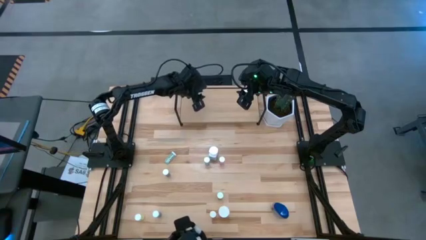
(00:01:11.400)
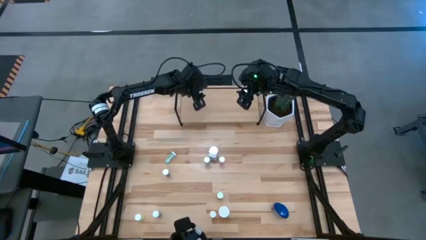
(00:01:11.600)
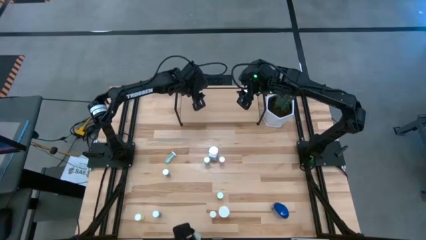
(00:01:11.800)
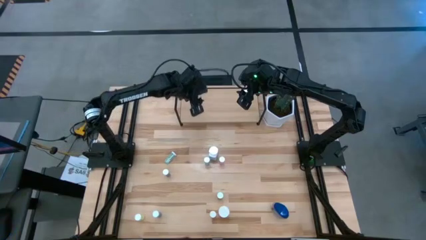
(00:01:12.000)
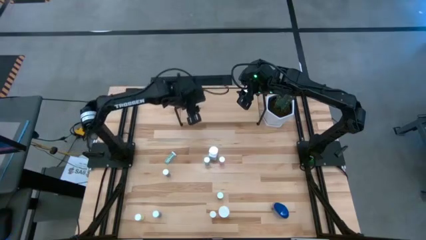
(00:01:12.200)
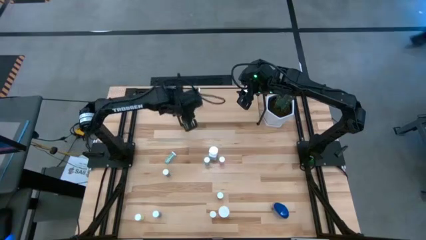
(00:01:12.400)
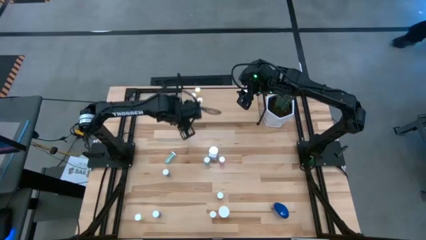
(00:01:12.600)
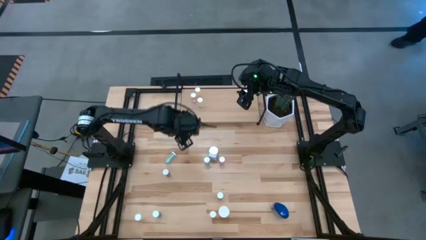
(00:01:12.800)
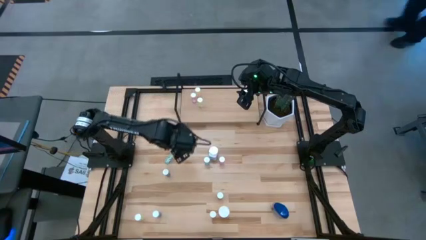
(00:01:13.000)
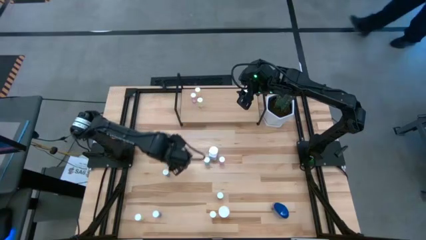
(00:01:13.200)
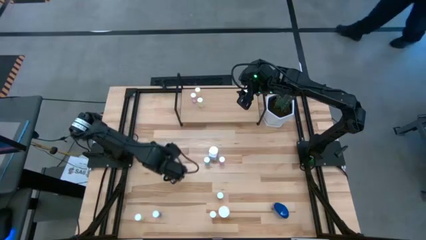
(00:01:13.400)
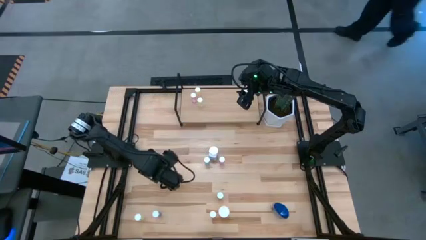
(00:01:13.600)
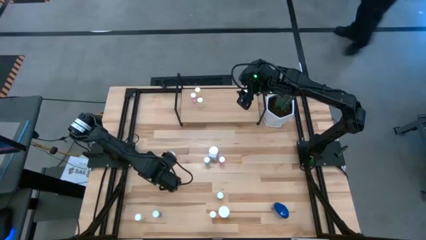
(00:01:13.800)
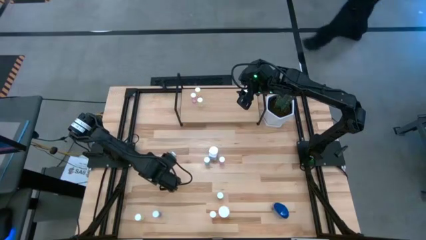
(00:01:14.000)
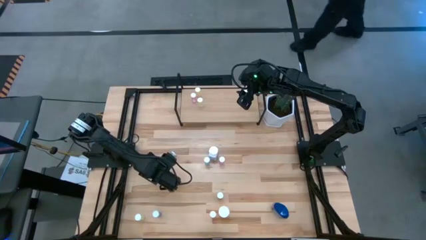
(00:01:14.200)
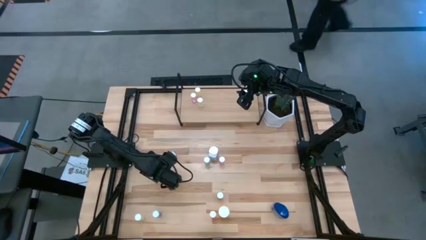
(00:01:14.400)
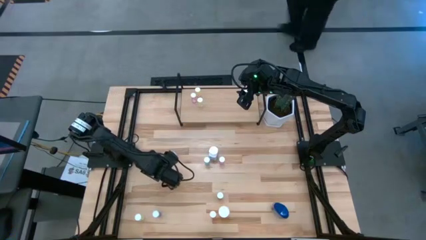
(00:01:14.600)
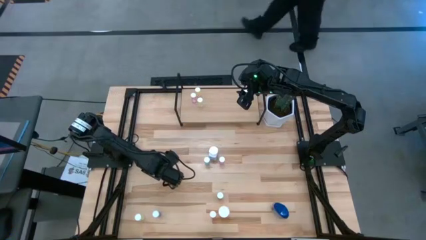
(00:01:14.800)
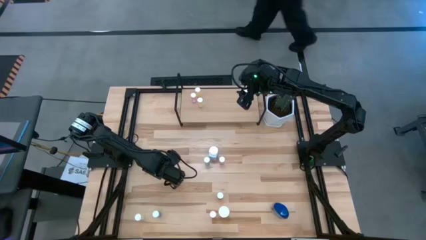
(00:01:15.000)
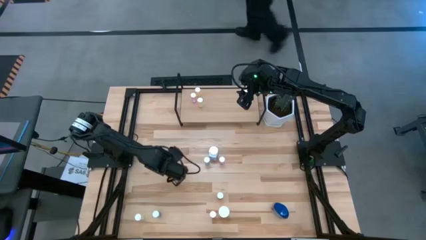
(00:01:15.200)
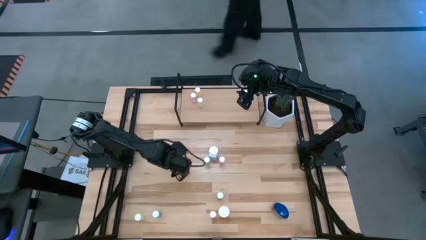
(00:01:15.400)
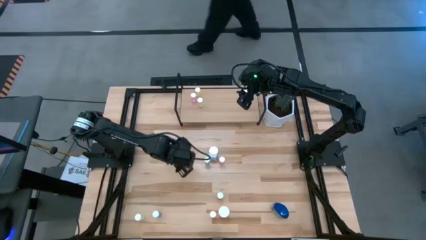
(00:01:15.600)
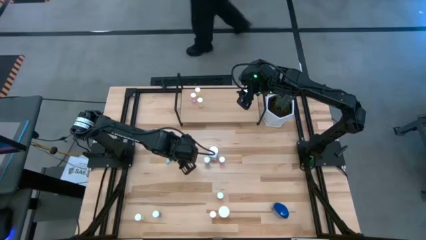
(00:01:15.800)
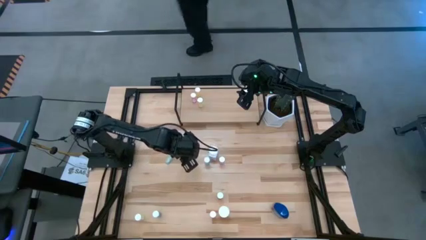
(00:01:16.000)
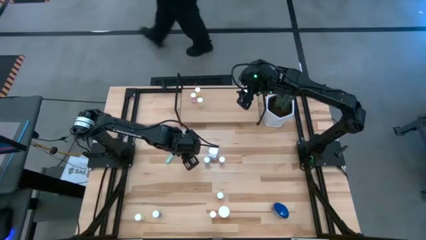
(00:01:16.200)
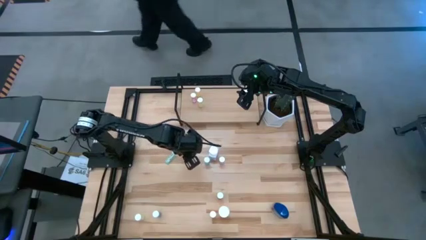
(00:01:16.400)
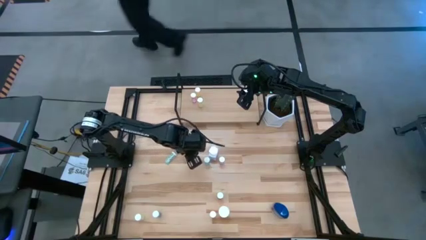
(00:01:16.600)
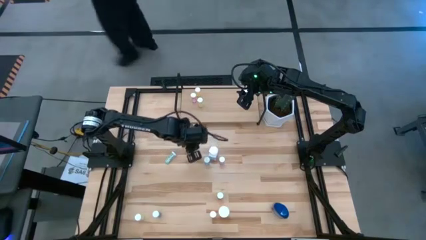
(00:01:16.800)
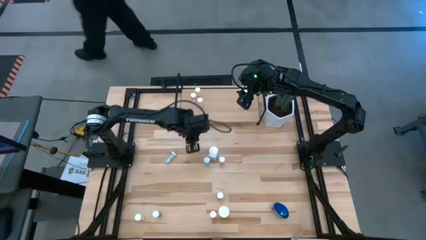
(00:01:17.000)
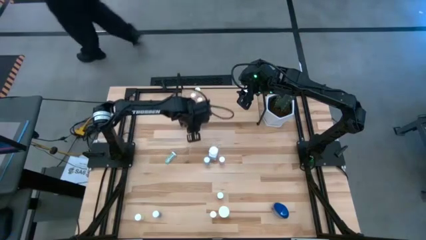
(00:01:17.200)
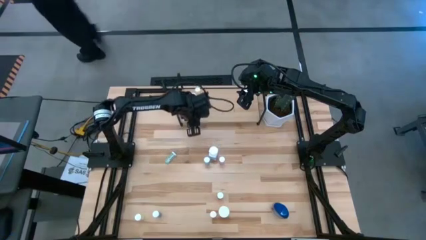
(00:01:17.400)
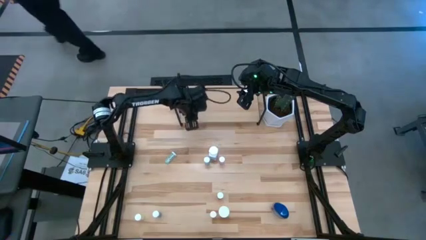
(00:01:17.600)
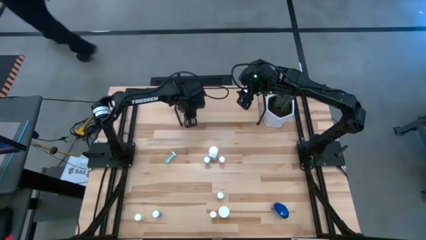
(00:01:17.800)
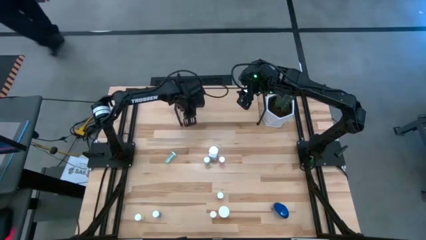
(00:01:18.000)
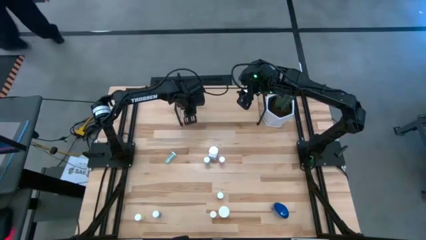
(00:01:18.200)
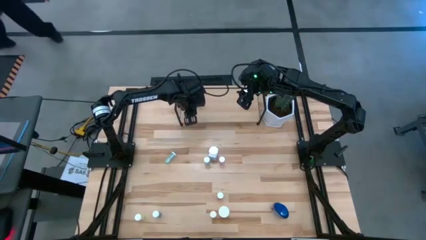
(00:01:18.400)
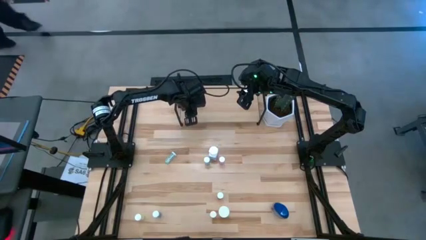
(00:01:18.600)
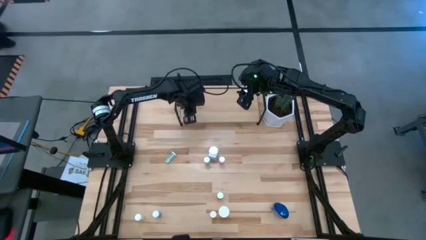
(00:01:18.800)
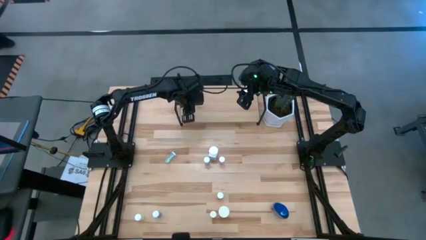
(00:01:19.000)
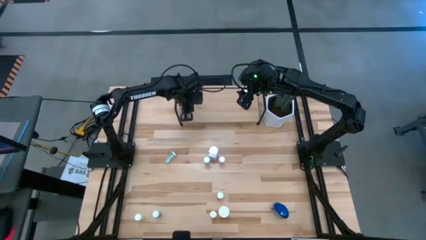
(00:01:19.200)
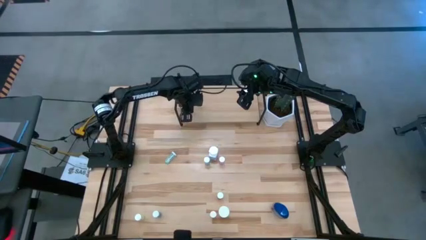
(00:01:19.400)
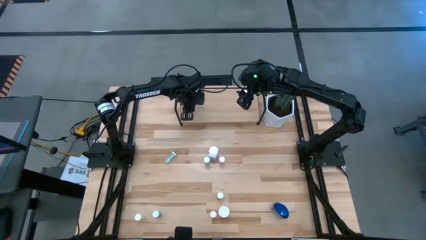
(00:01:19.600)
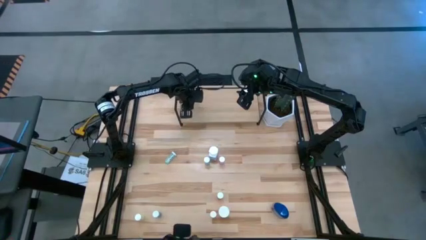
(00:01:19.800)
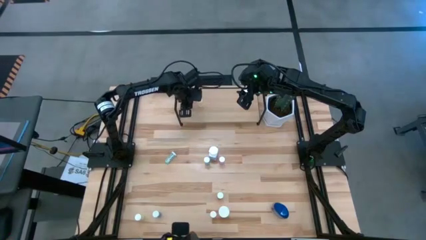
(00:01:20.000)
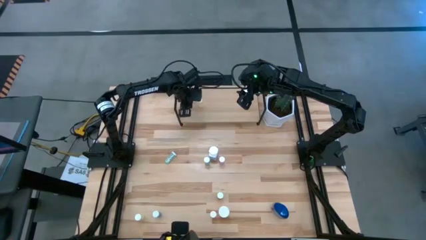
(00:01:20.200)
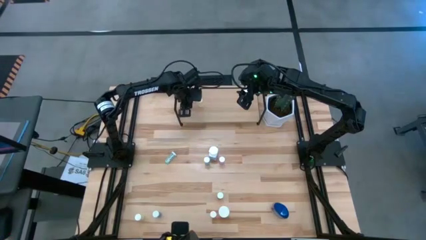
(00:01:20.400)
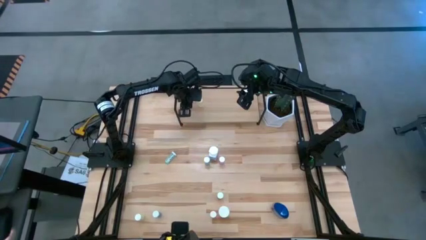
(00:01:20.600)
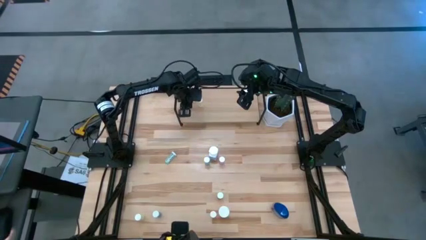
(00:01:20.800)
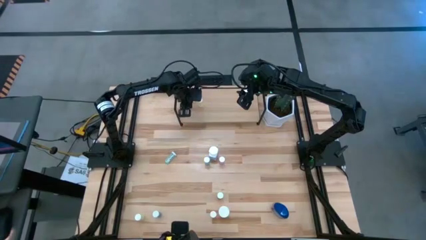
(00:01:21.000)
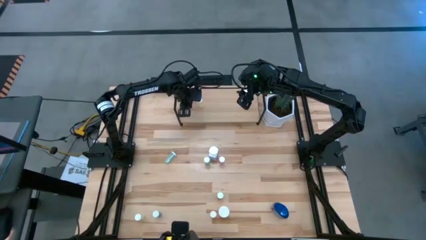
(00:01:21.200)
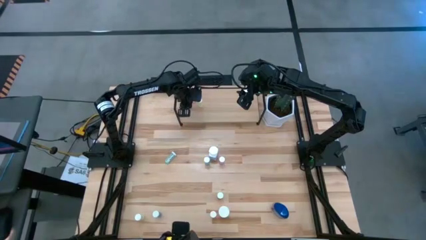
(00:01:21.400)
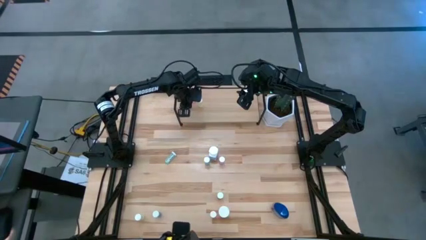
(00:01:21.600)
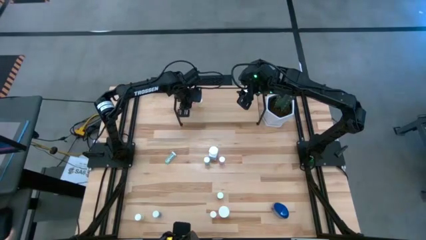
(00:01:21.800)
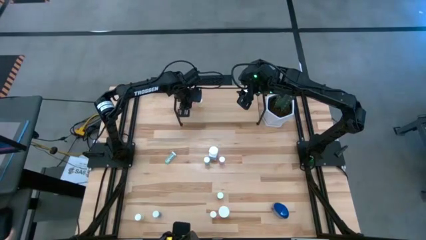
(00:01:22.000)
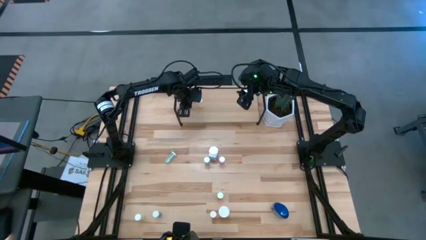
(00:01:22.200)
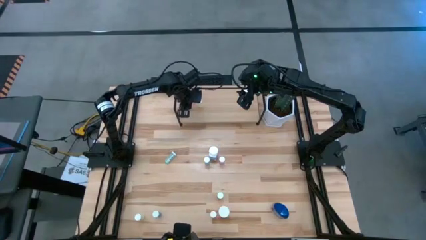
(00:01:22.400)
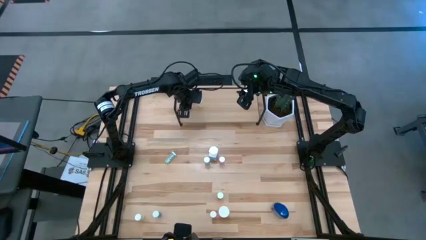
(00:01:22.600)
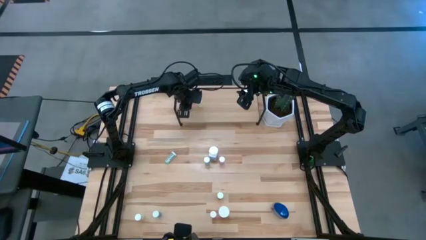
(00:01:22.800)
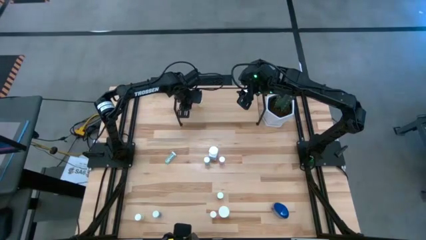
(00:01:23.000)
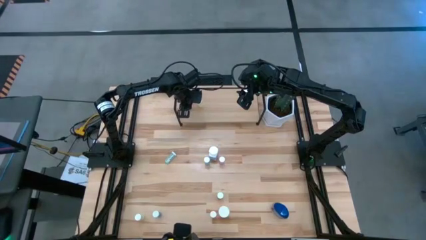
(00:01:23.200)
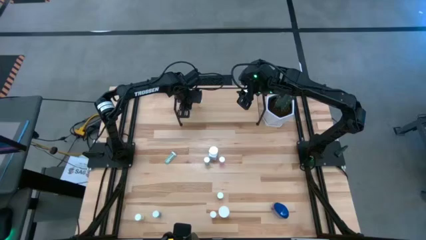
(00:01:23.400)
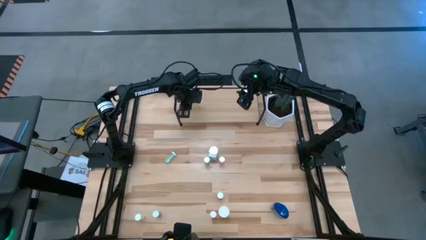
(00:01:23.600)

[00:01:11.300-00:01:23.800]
Task: Pick and place medicine bottles onto shelf by color
Put the blue pill bottle on the shelf
